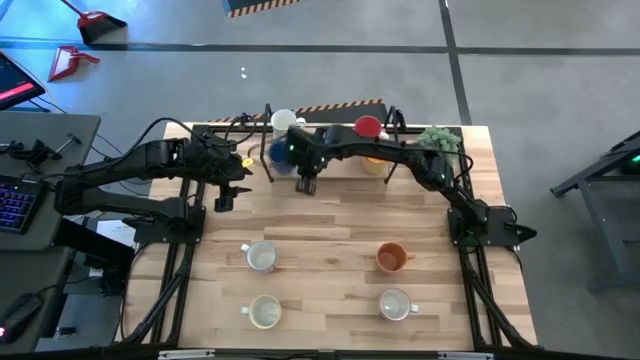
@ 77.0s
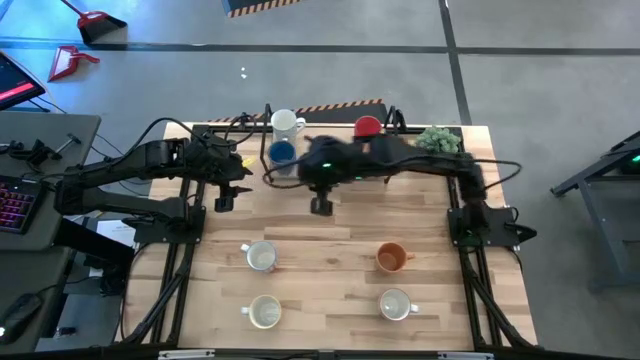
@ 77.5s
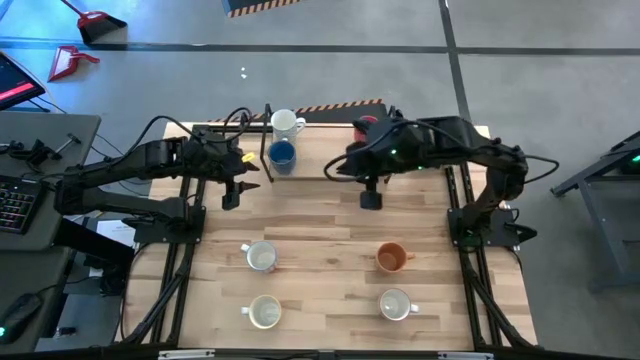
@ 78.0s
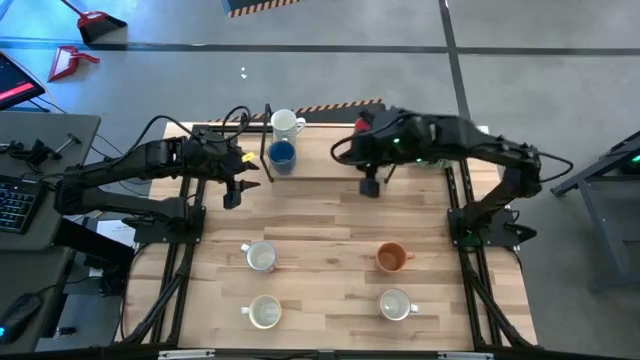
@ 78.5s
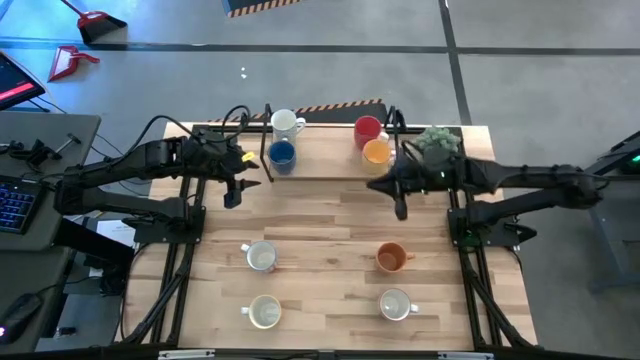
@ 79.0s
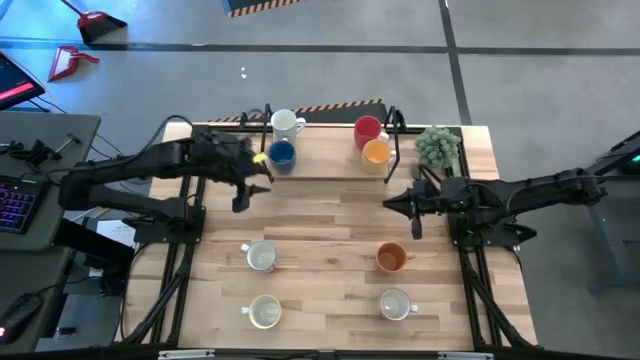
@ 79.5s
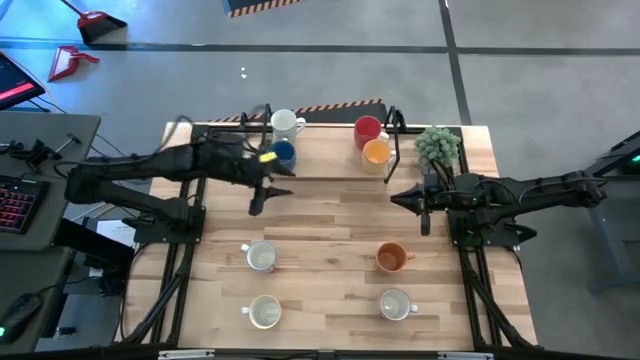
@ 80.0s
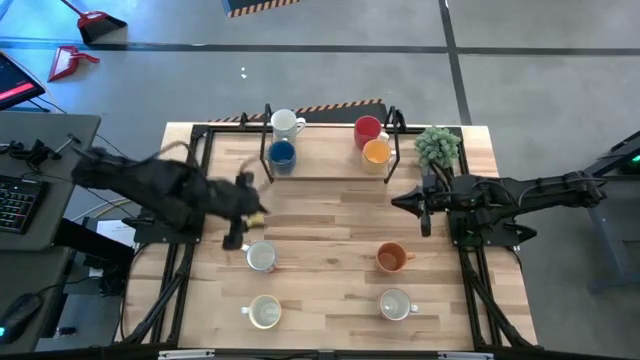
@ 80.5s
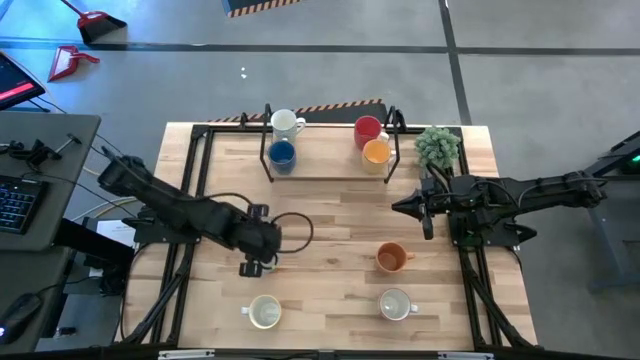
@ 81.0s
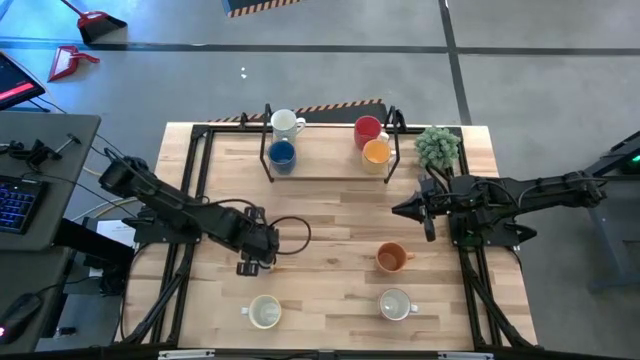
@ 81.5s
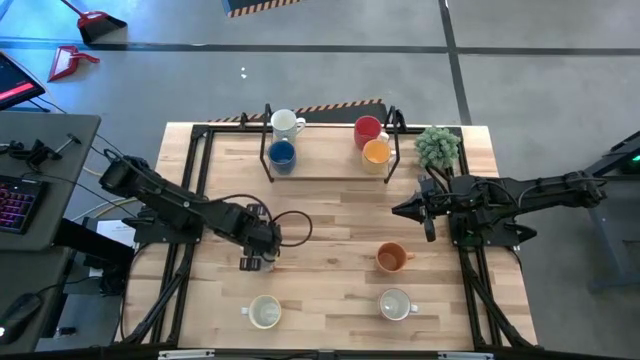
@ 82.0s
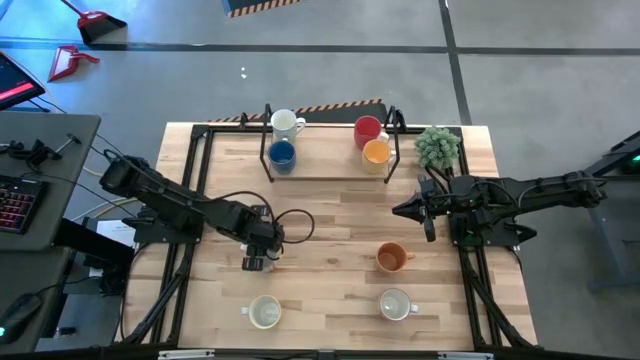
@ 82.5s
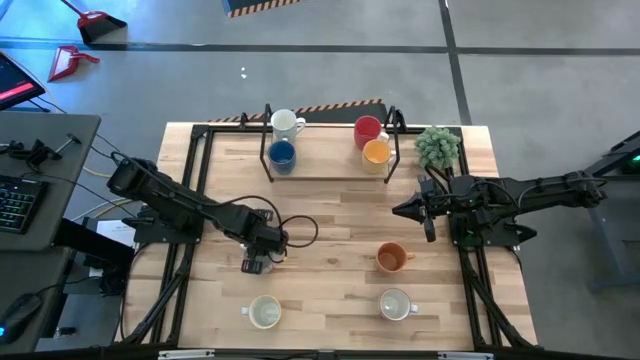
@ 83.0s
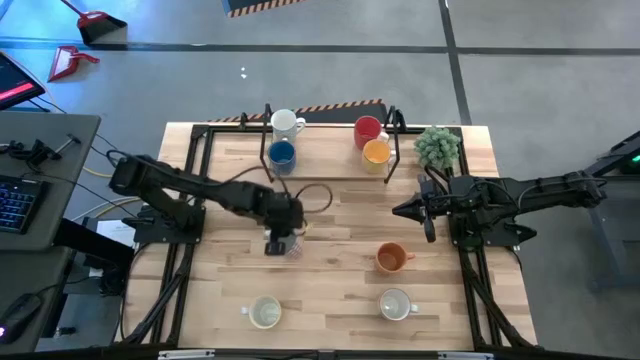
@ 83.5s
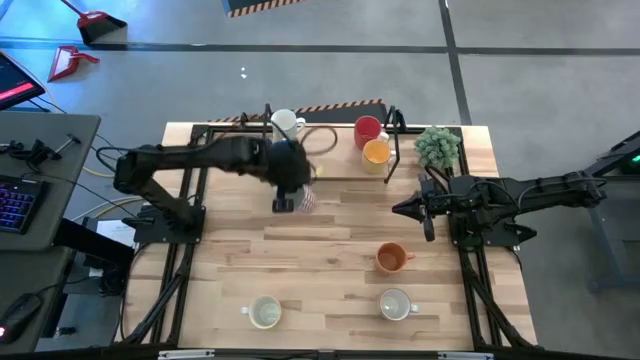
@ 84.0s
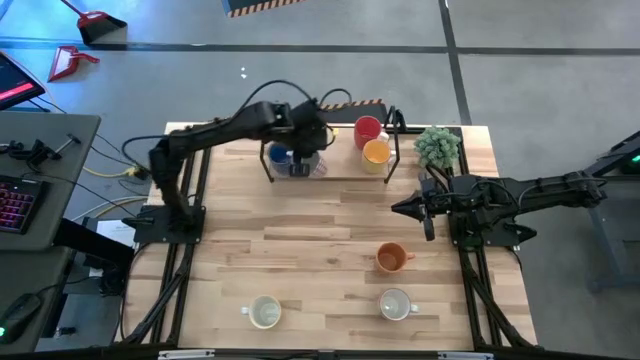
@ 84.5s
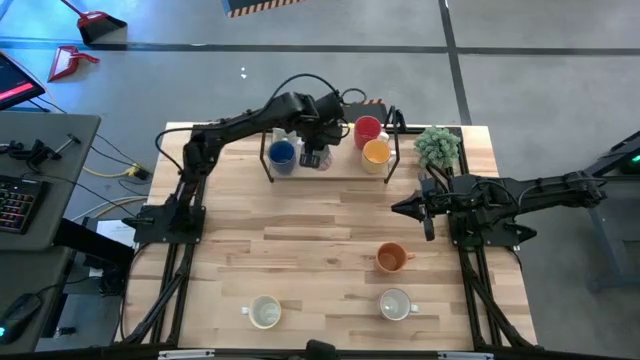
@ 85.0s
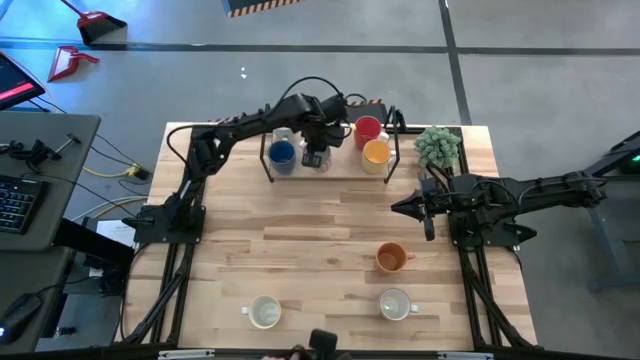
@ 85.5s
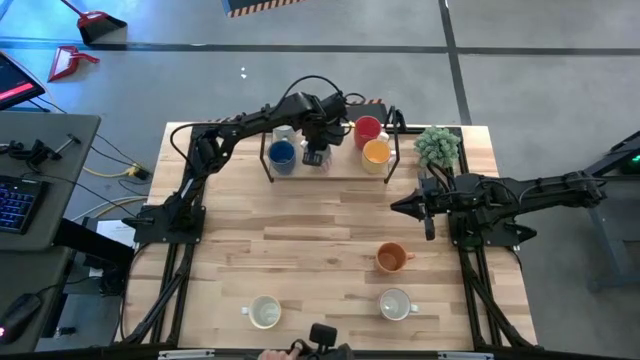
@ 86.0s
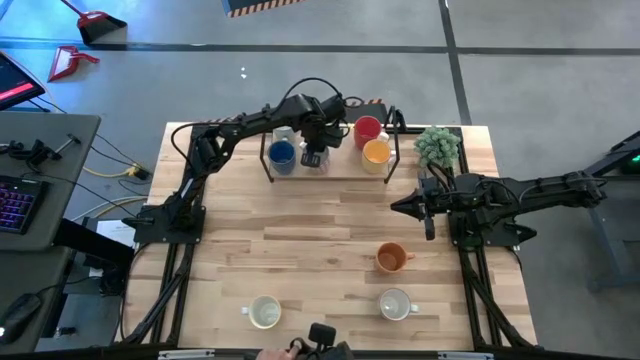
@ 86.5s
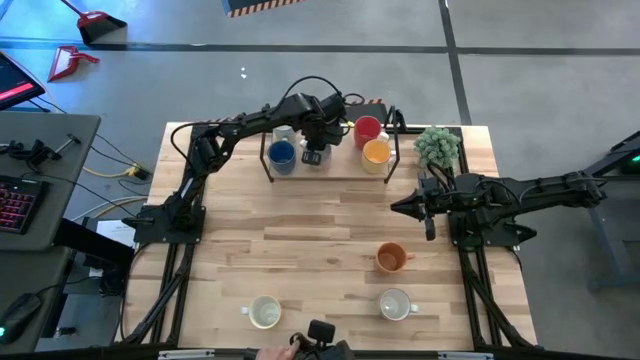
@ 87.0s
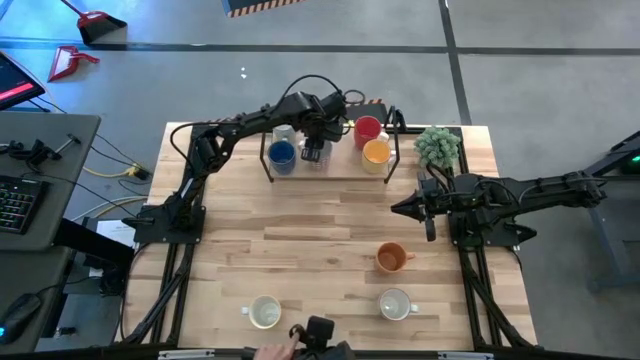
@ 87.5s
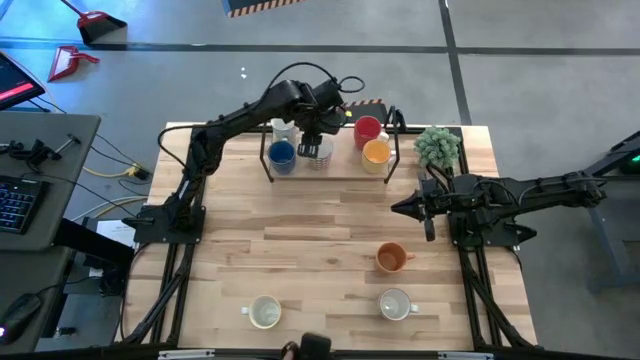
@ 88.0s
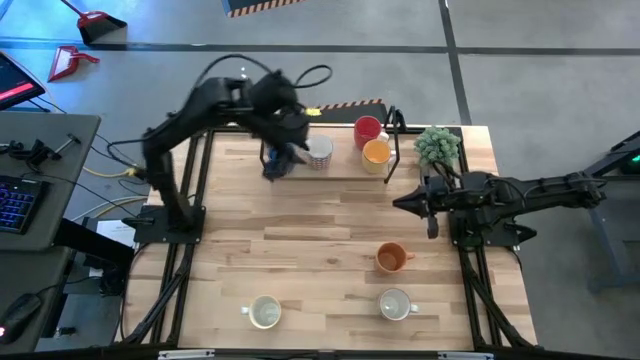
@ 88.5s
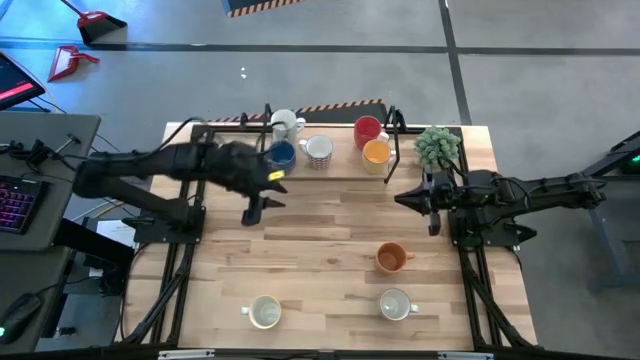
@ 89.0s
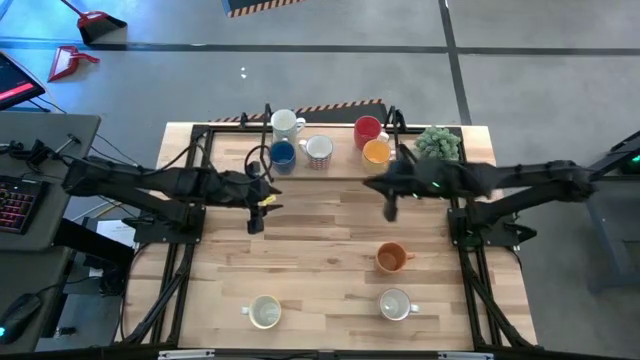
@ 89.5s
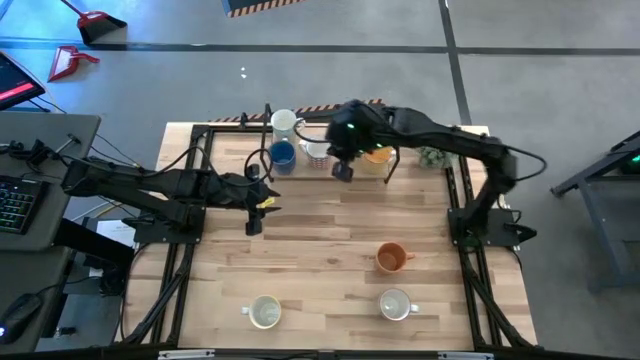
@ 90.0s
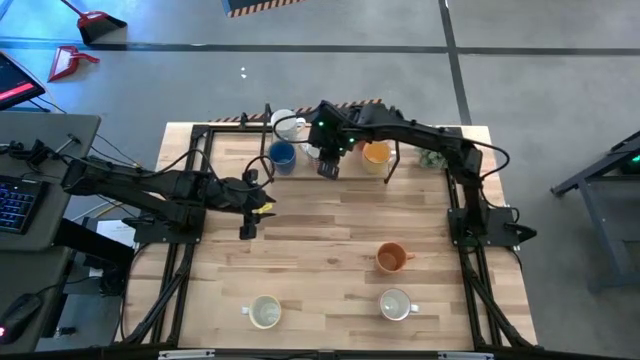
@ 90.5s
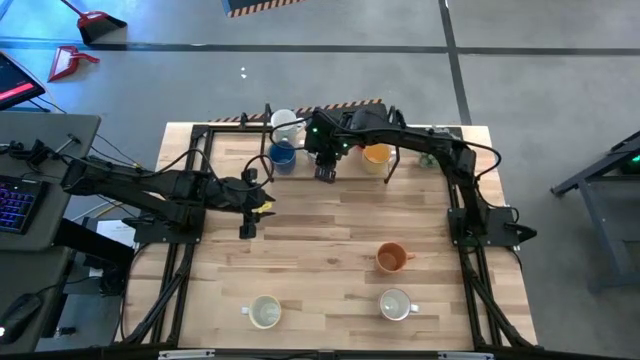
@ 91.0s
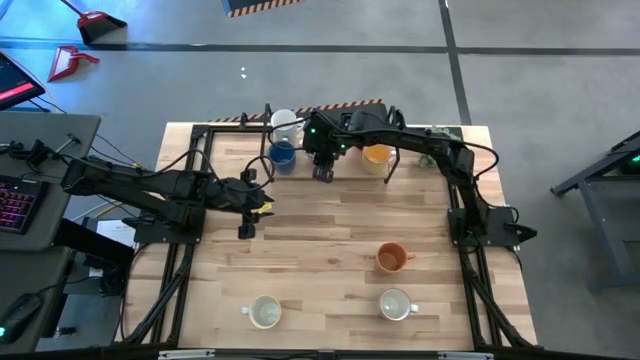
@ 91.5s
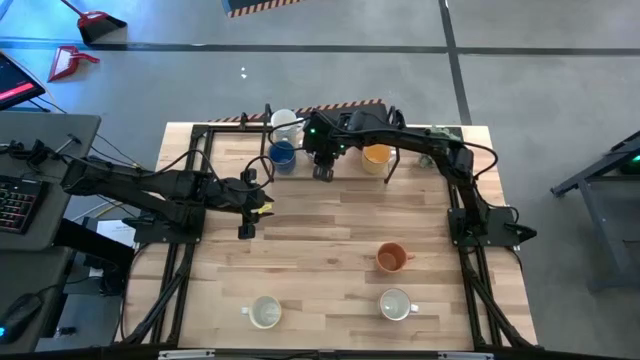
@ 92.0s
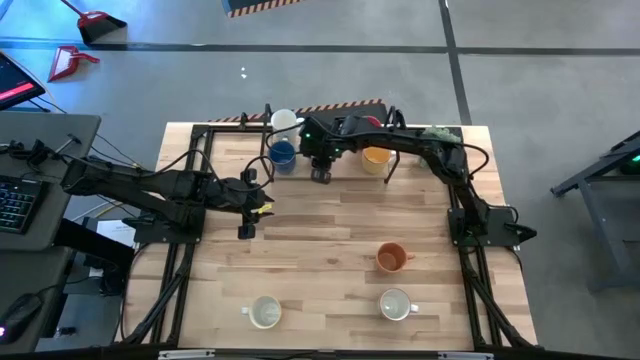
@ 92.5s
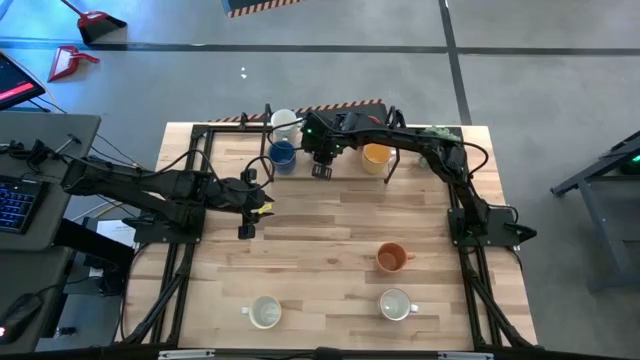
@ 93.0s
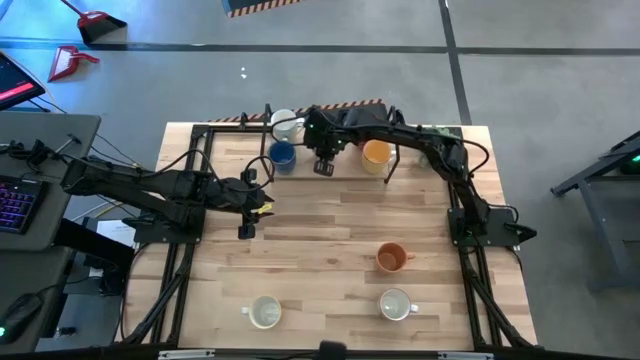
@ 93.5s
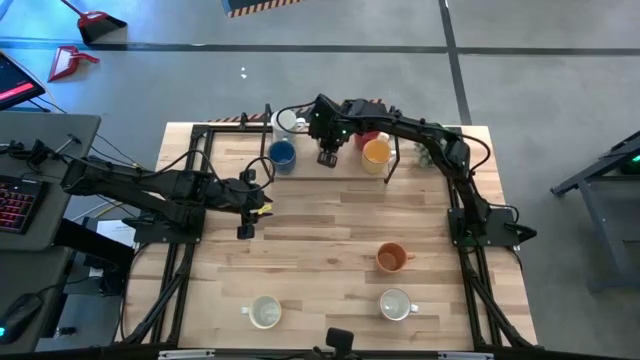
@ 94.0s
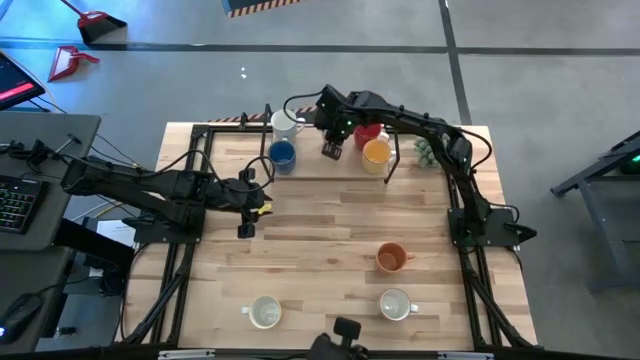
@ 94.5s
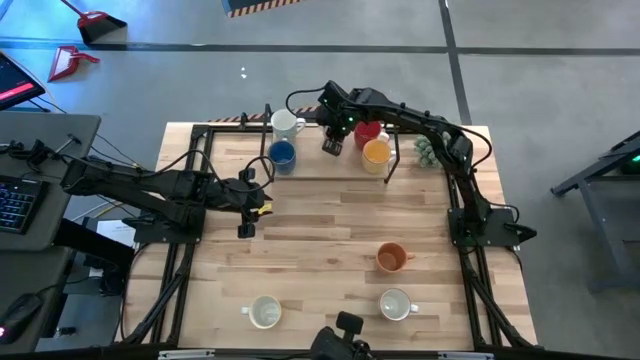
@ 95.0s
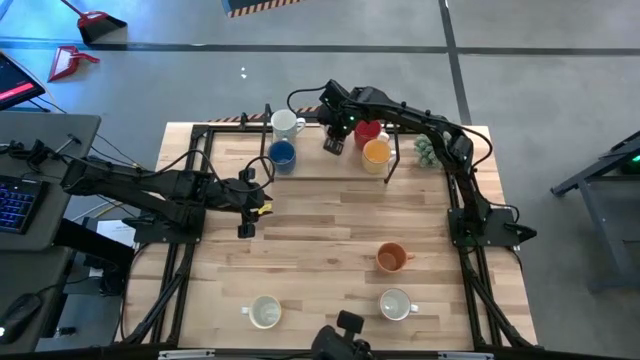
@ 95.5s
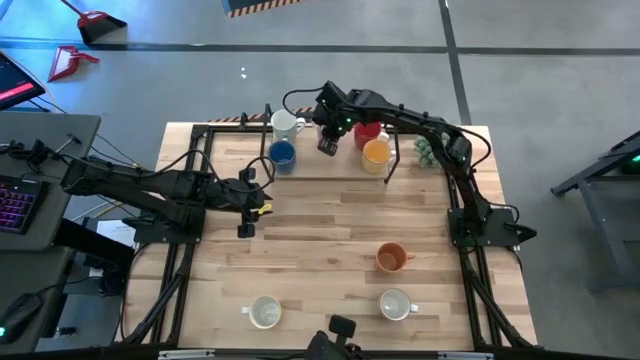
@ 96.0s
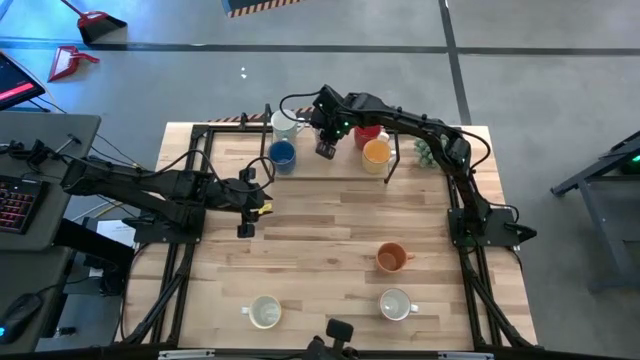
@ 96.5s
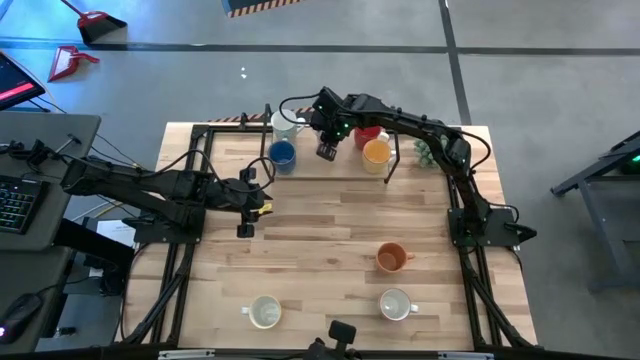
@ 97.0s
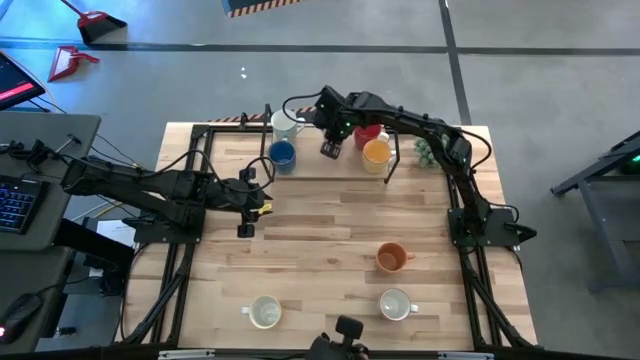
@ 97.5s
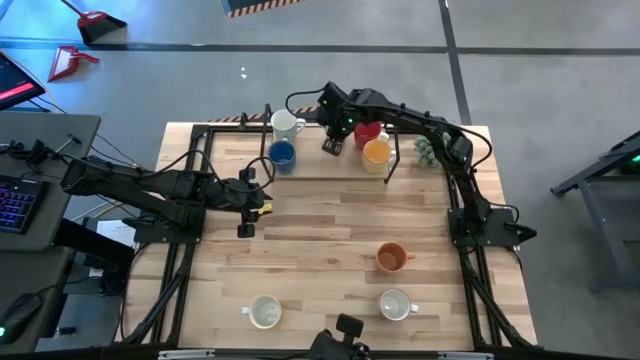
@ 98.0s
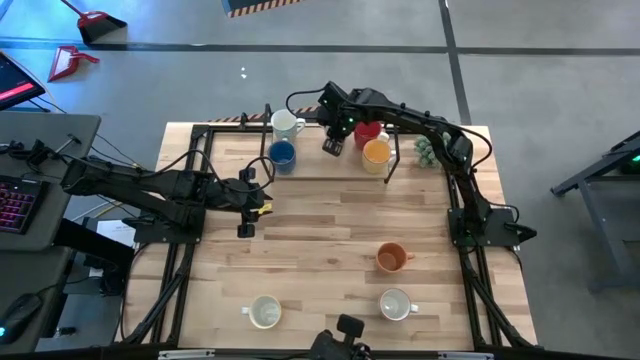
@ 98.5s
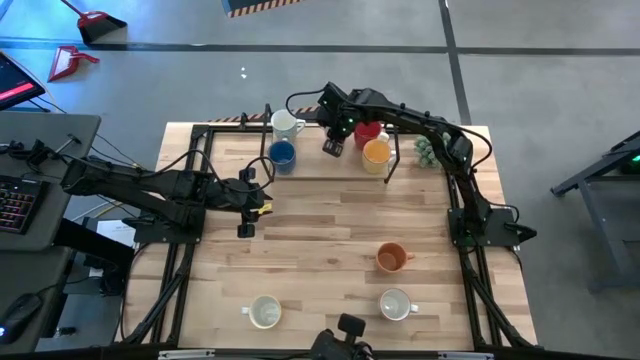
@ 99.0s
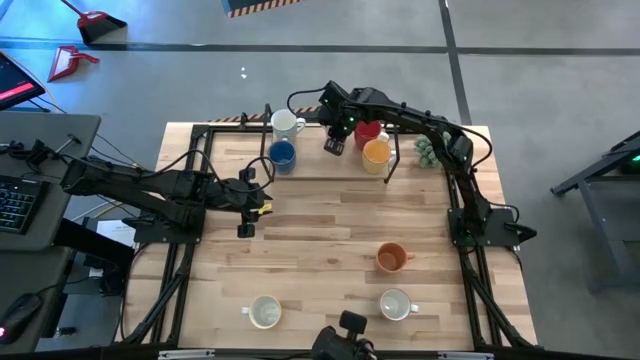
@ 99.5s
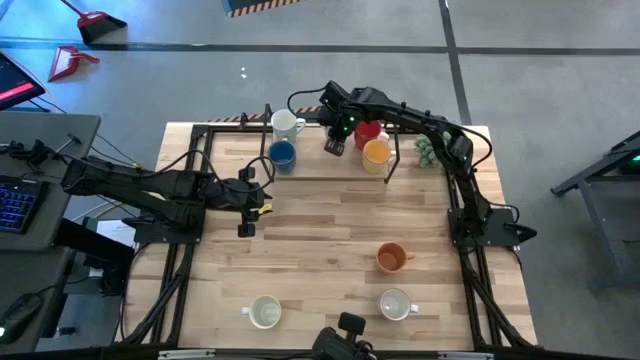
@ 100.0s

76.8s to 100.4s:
Task: Place coffee mugs
Put the white red mug on the shelf
